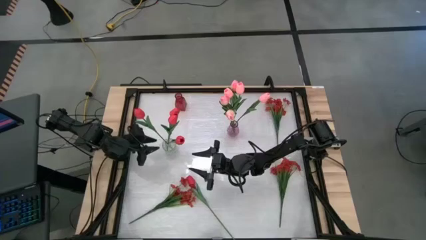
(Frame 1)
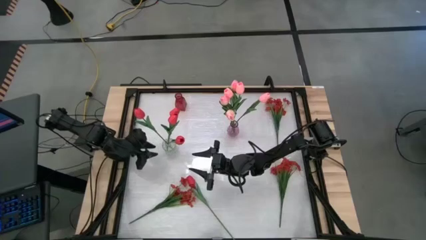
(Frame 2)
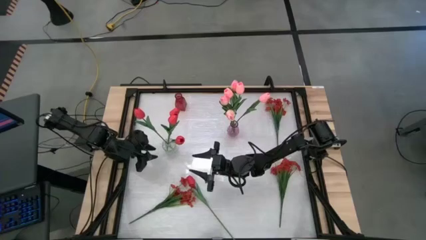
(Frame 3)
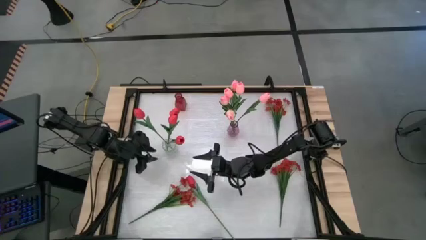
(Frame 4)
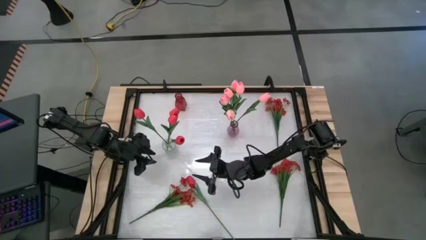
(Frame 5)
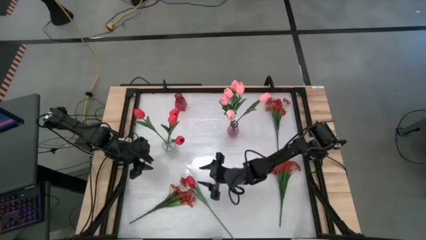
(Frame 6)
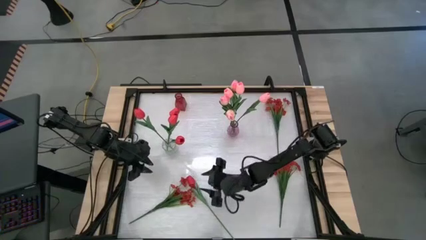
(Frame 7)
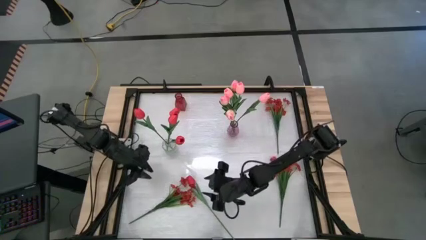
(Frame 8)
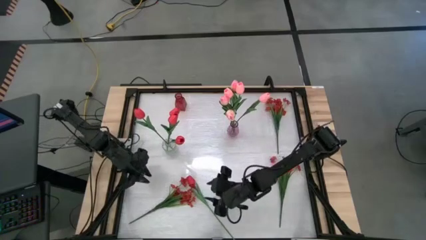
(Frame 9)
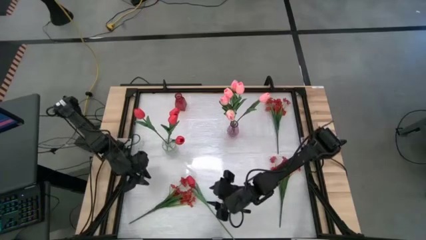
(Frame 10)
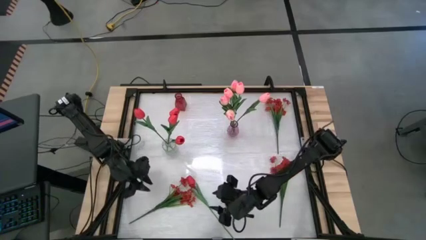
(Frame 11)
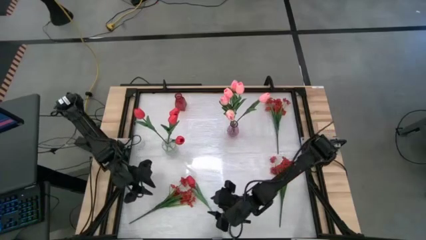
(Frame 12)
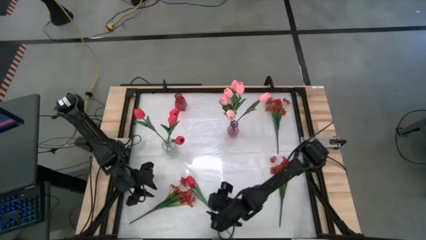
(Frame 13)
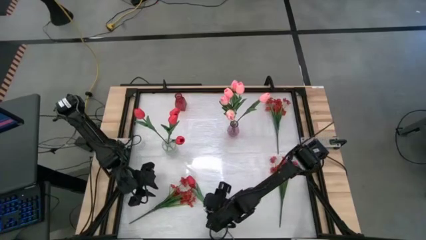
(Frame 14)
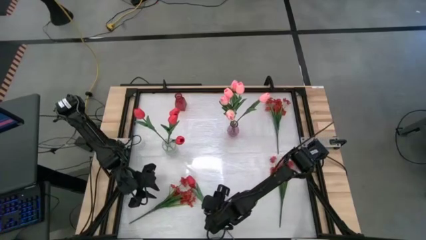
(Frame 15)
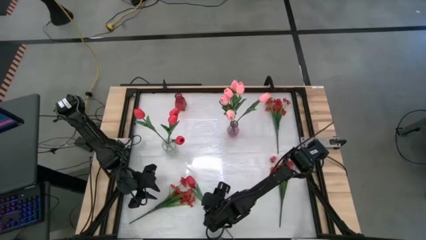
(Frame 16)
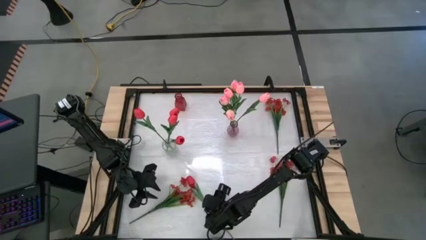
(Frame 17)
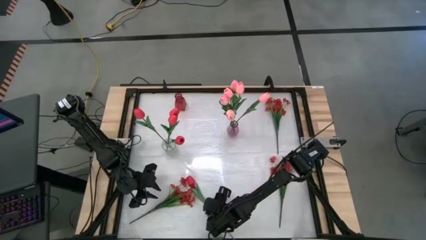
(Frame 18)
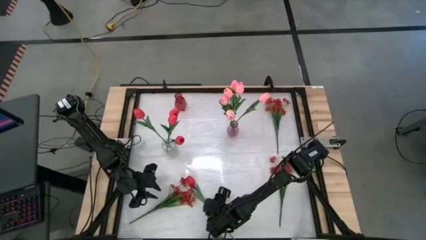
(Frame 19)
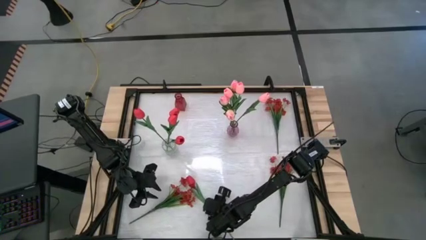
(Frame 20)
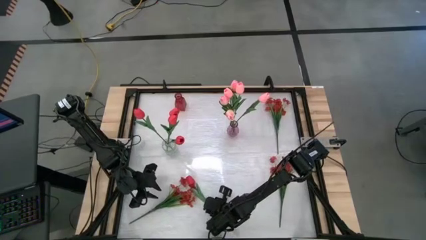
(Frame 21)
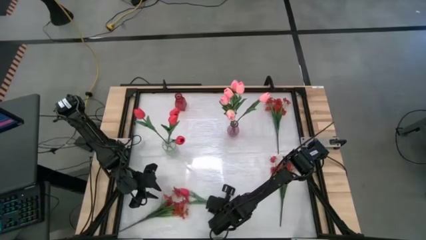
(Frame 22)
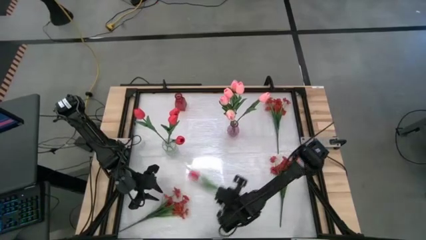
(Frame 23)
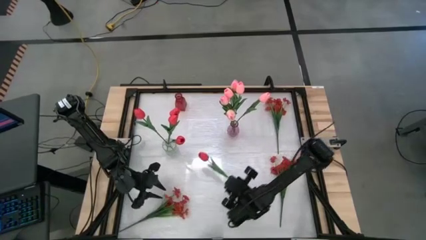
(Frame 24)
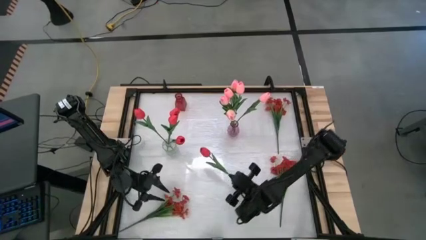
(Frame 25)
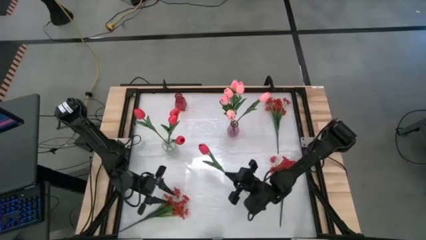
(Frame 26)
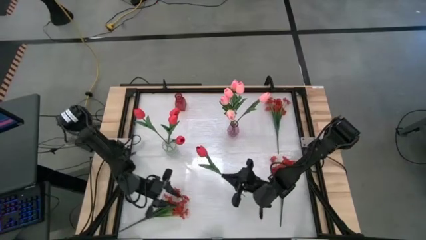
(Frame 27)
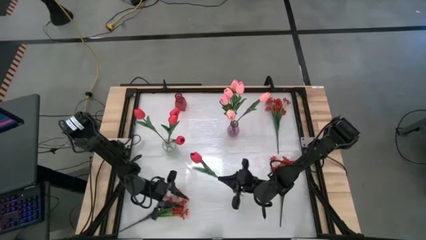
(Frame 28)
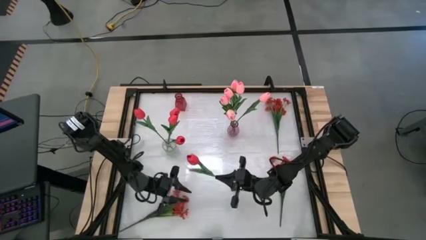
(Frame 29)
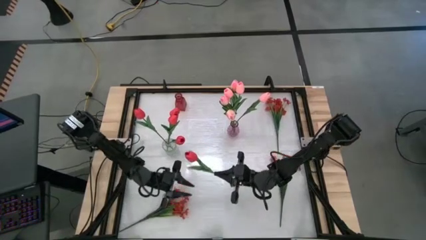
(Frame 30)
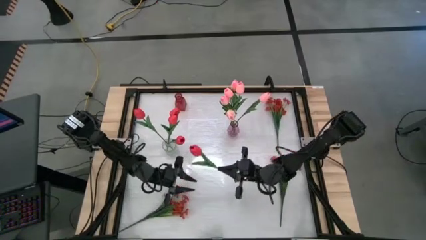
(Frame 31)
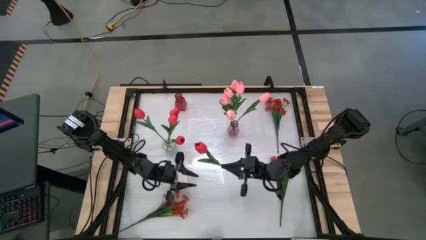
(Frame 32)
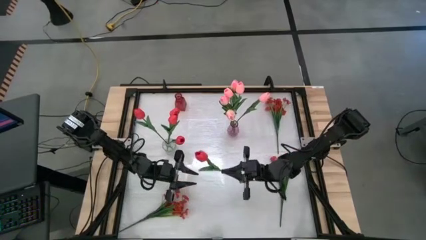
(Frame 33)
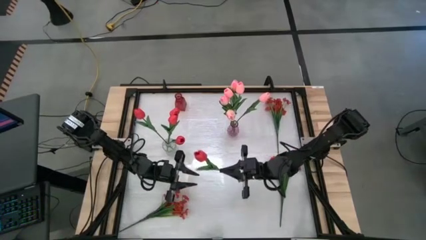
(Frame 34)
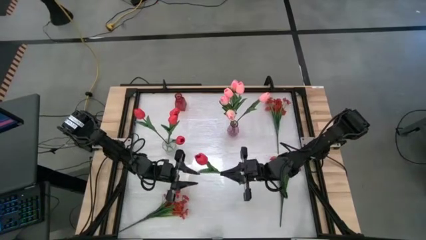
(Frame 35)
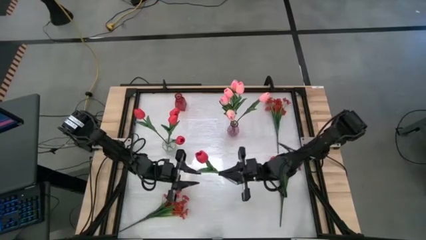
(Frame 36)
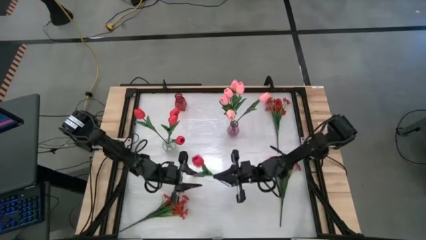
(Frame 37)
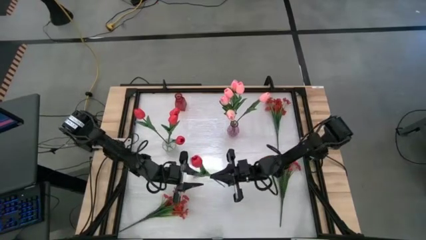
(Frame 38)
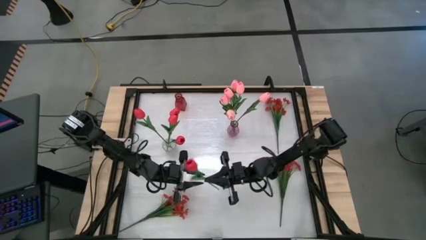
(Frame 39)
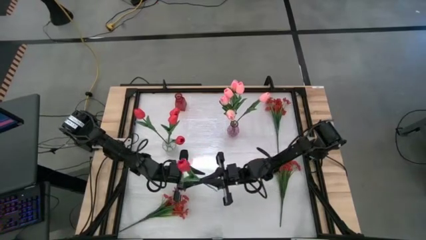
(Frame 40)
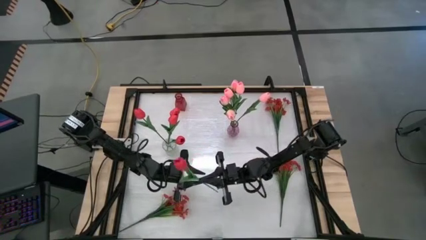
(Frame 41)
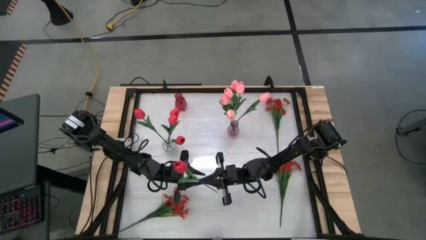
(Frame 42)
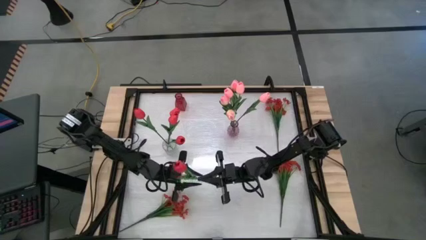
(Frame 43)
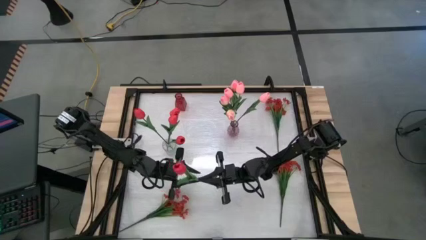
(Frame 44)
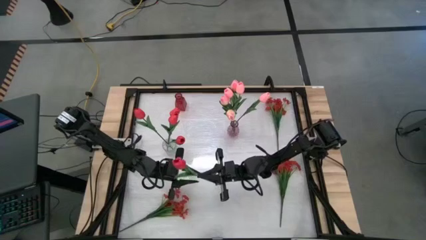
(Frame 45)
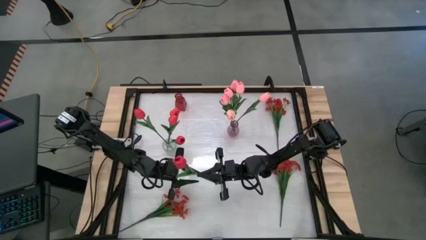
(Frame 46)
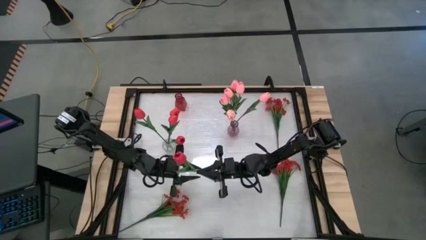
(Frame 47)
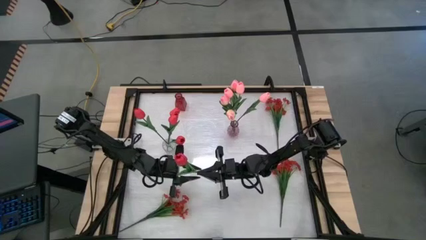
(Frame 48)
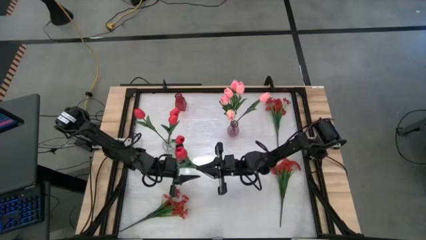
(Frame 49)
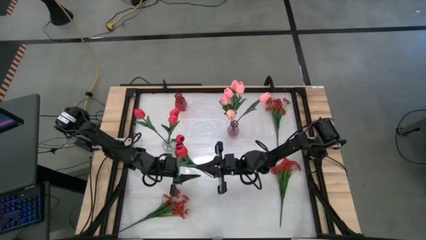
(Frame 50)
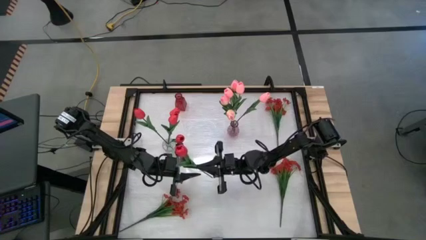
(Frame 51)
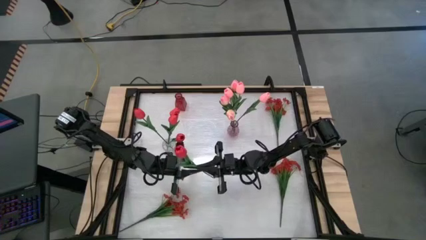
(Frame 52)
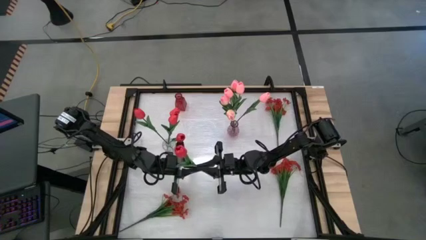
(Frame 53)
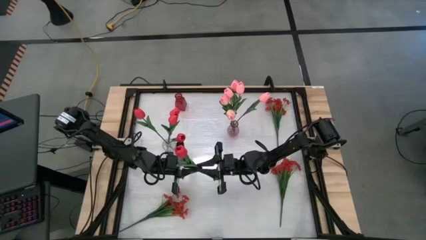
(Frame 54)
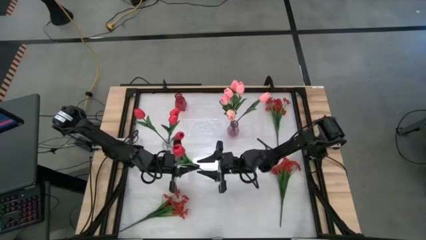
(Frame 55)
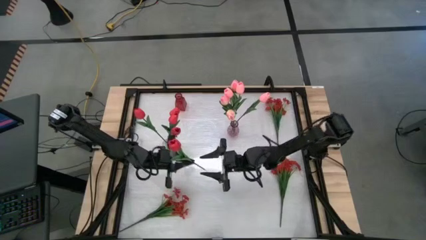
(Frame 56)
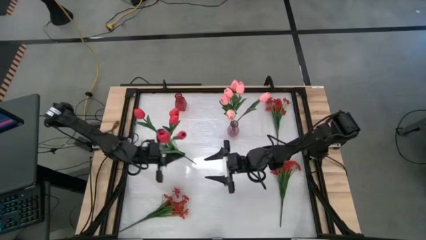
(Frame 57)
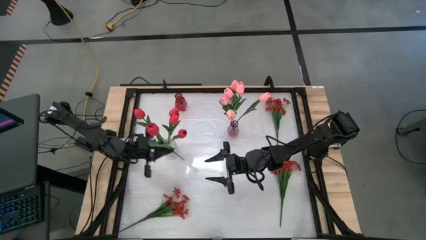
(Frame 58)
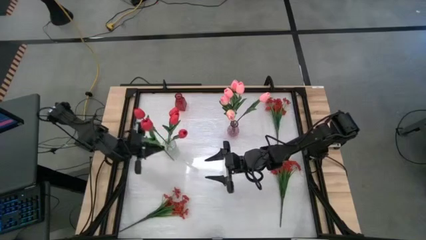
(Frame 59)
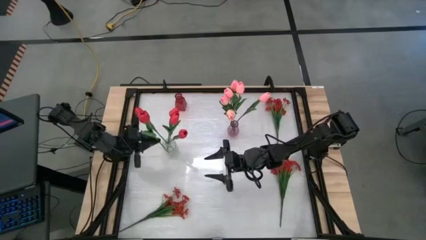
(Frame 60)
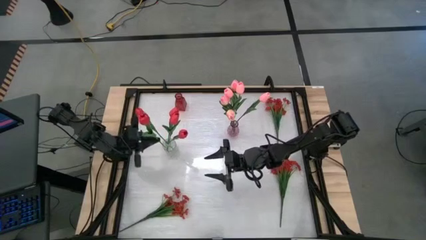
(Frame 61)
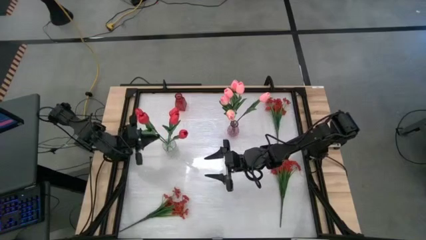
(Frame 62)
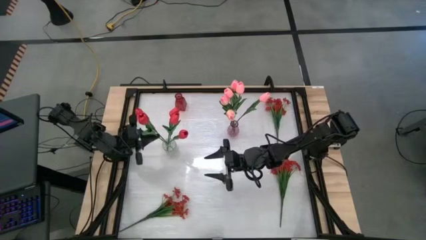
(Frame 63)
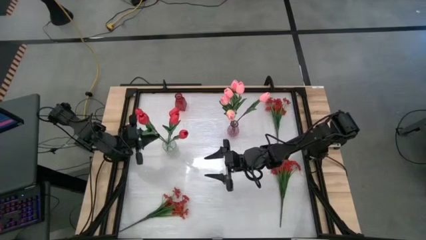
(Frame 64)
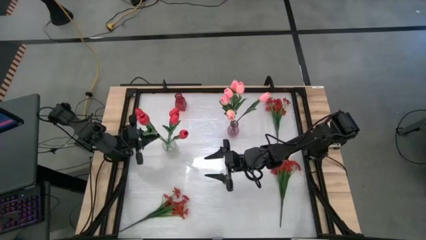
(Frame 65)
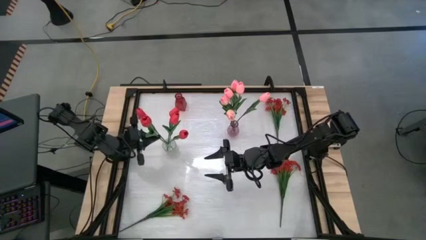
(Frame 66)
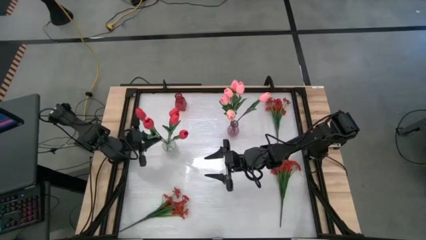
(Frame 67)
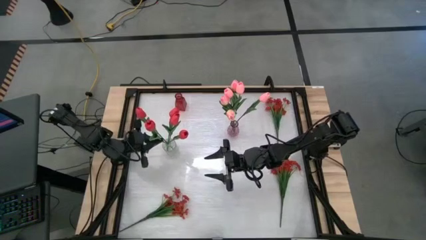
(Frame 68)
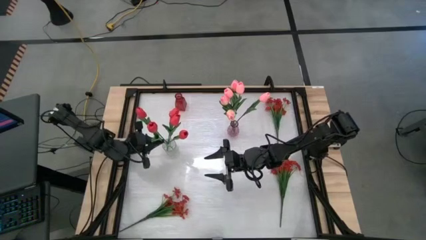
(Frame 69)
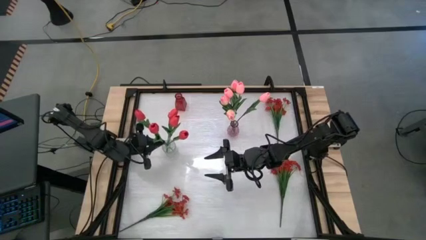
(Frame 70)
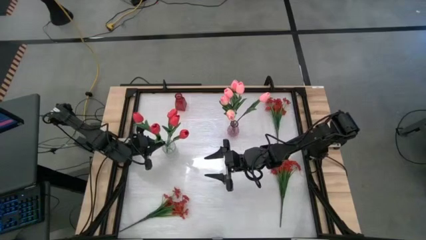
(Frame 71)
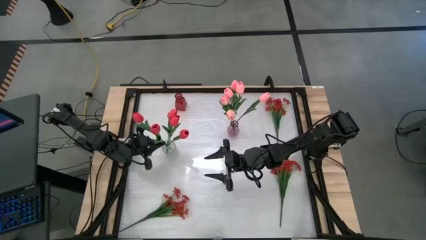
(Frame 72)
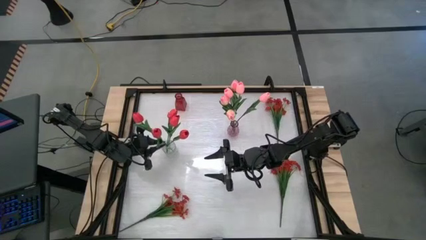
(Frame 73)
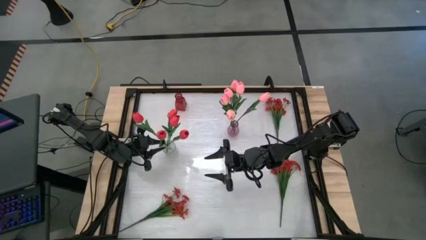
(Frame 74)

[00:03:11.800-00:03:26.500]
Task: Sort flowers into vase by color
Put the red tulip into the transparent vase

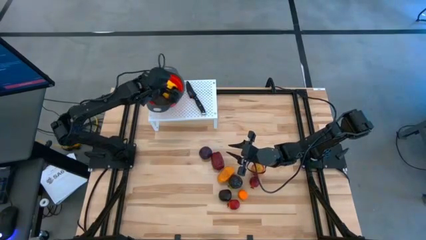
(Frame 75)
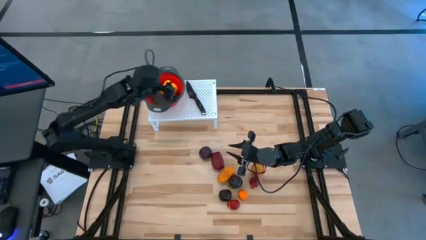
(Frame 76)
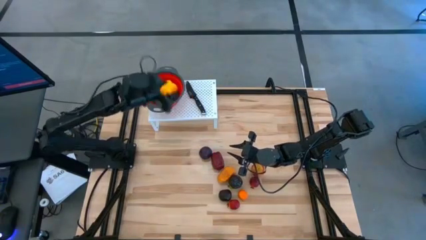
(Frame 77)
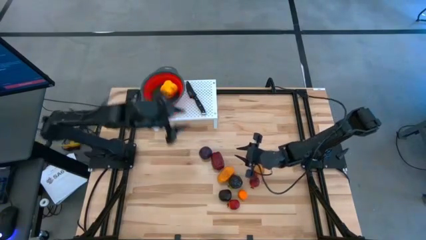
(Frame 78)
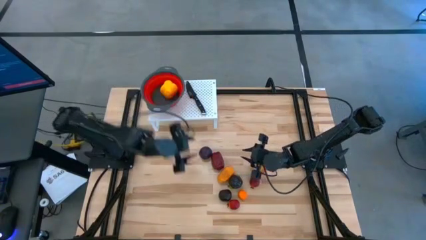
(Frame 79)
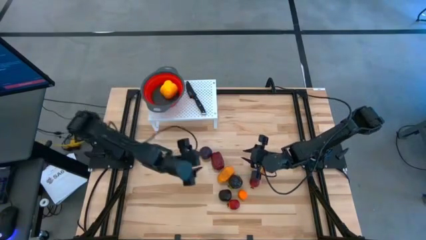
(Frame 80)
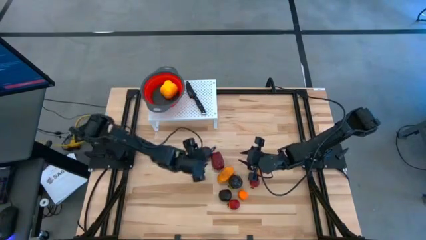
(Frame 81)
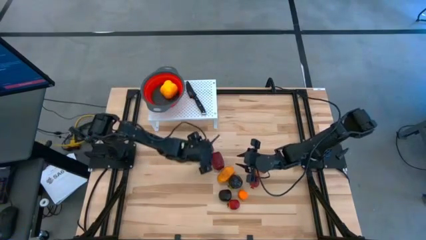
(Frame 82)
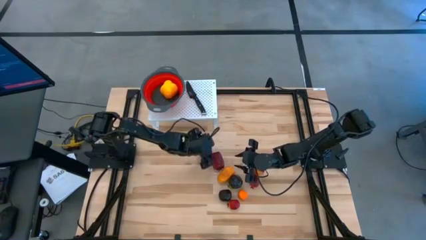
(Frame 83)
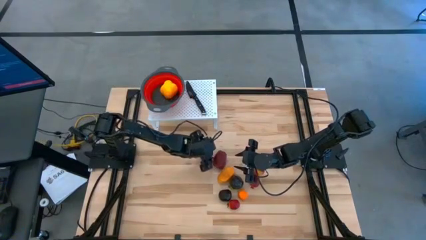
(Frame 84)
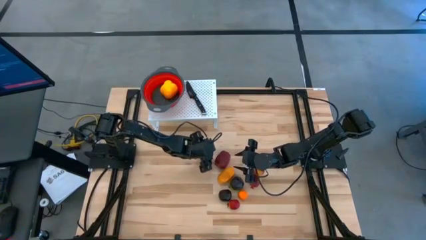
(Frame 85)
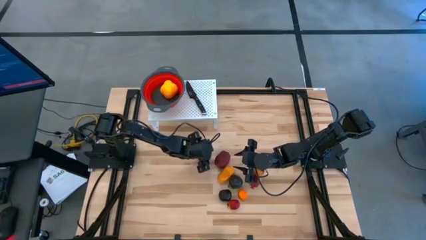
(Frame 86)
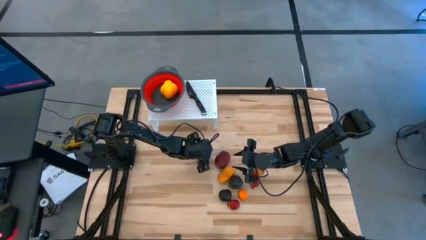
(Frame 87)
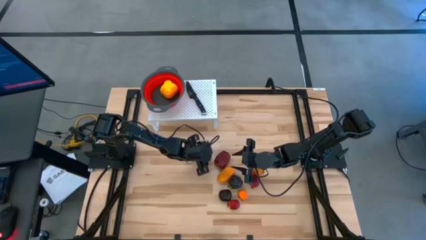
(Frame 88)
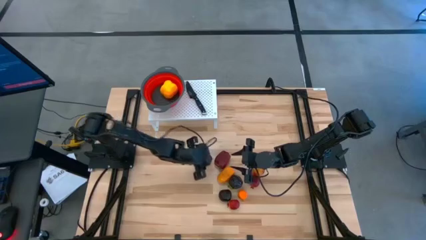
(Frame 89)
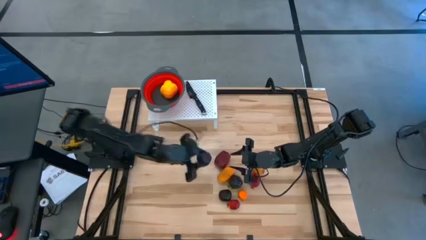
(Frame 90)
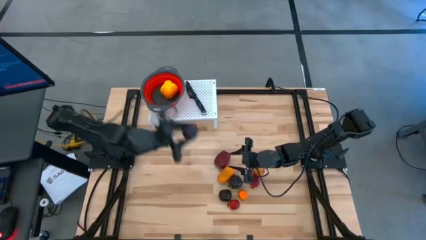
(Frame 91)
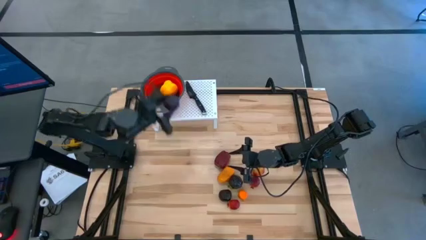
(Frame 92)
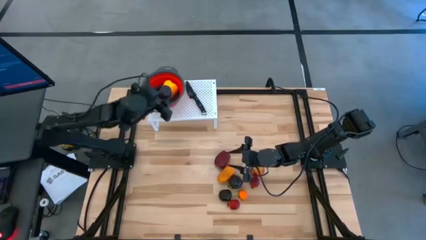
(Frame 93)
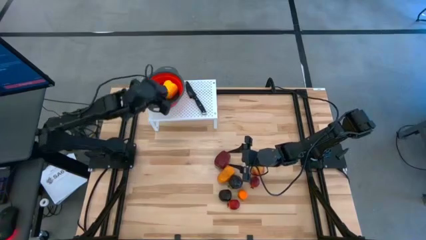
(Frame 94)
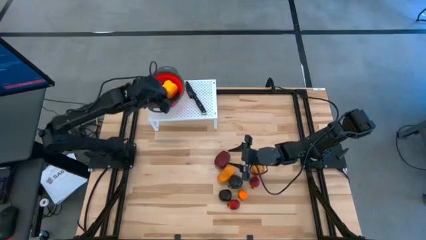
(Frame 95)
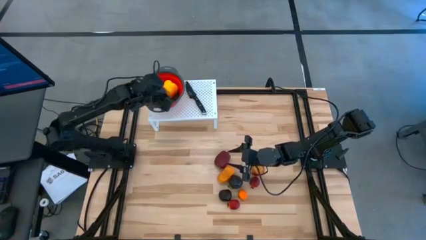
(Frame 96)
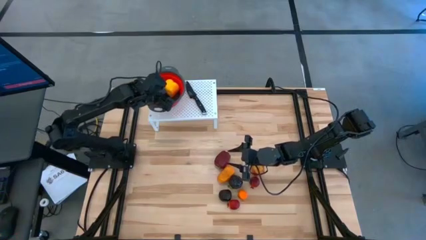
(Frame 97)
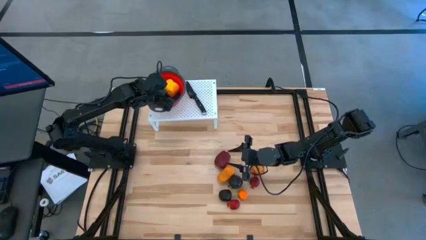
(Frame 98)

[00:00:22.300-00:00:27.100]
Task: Pick & Place Fruit
Put the top purple plum into the red strainer bowl on the shelf
